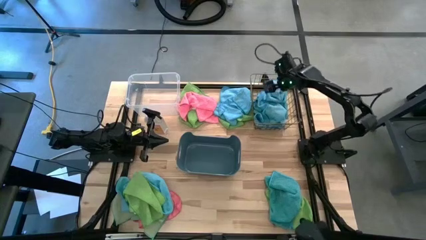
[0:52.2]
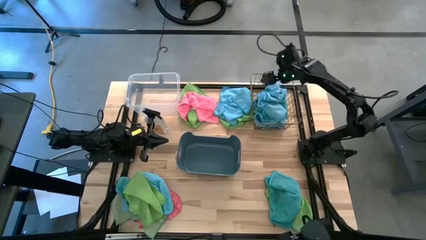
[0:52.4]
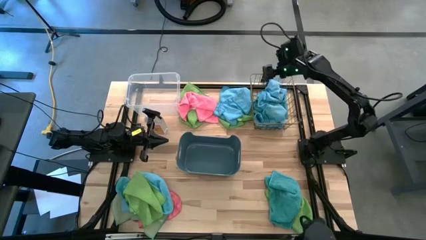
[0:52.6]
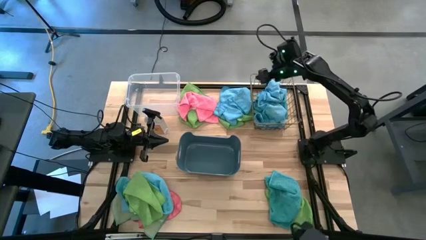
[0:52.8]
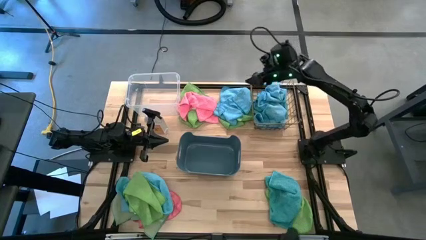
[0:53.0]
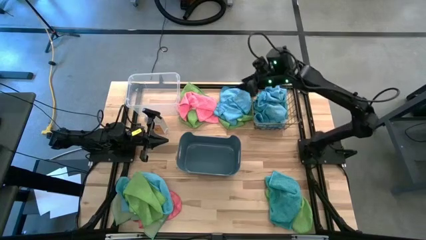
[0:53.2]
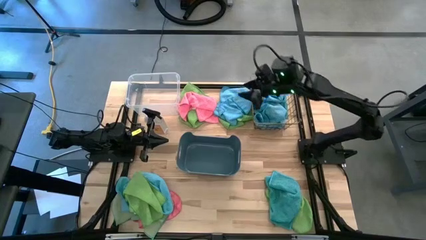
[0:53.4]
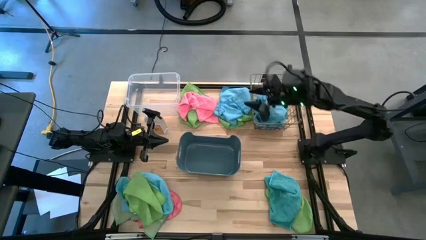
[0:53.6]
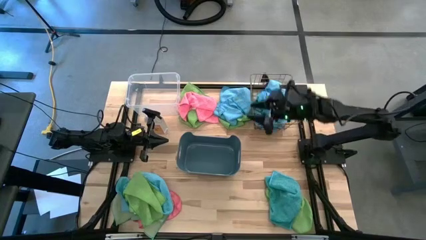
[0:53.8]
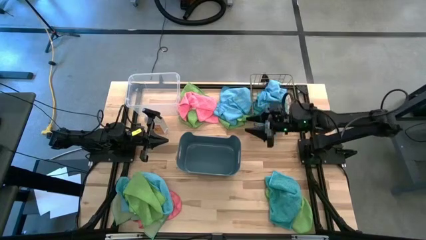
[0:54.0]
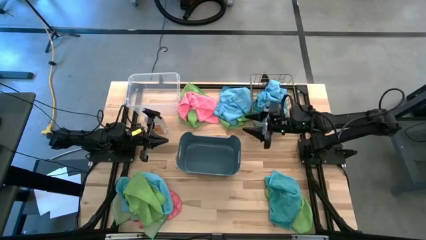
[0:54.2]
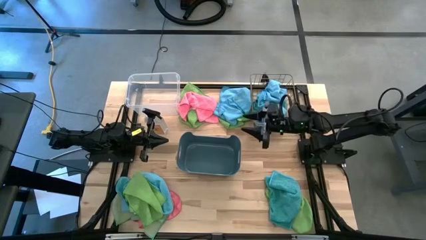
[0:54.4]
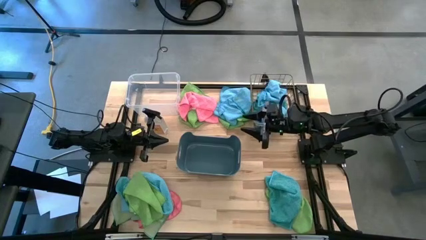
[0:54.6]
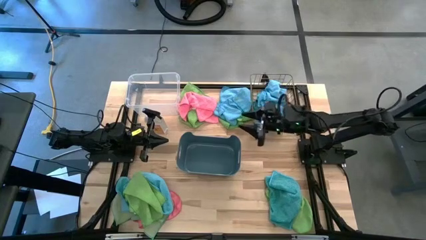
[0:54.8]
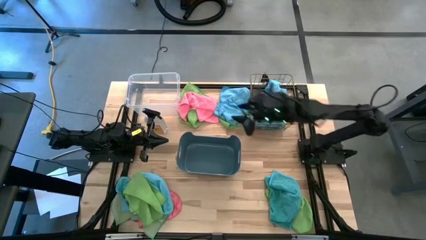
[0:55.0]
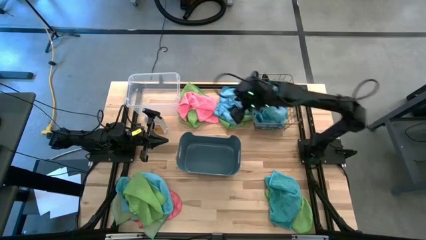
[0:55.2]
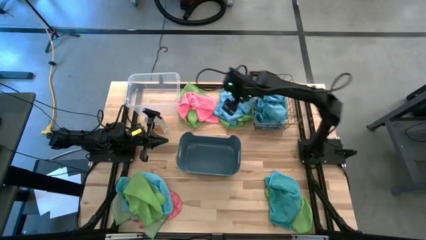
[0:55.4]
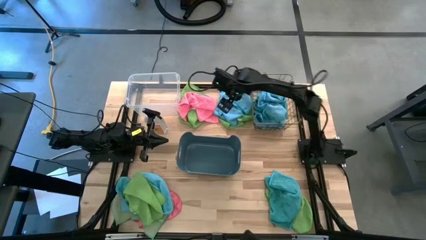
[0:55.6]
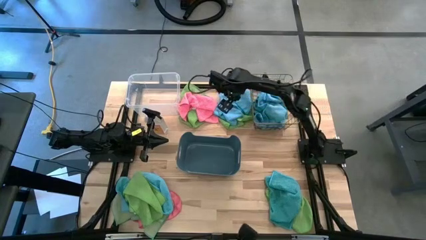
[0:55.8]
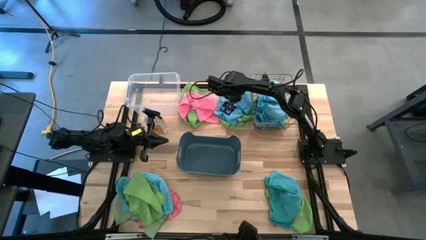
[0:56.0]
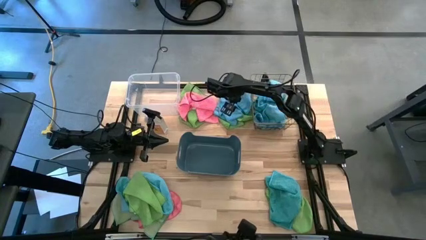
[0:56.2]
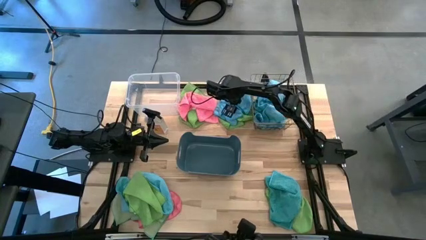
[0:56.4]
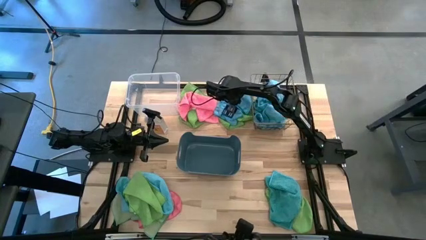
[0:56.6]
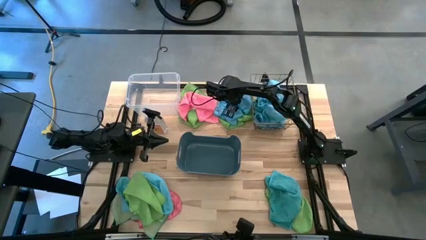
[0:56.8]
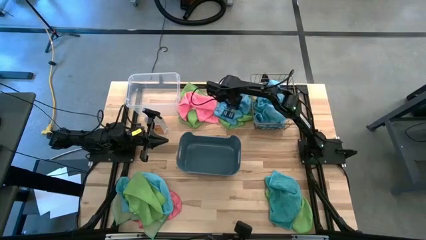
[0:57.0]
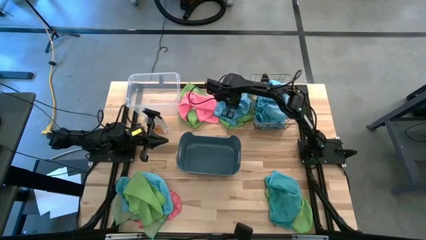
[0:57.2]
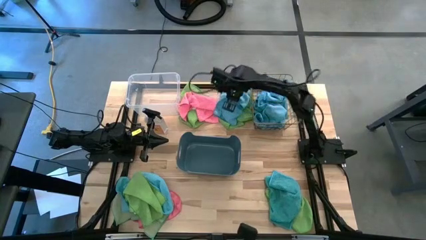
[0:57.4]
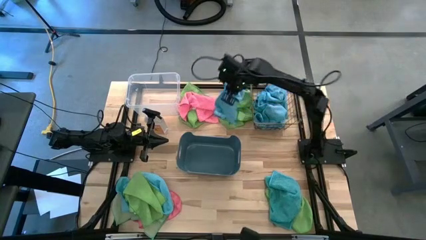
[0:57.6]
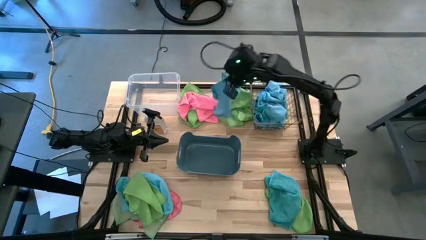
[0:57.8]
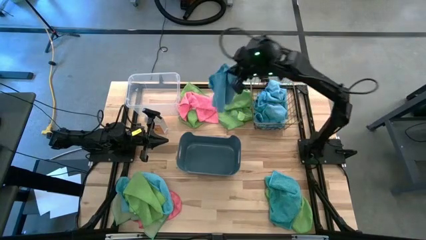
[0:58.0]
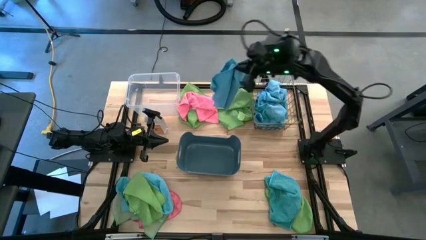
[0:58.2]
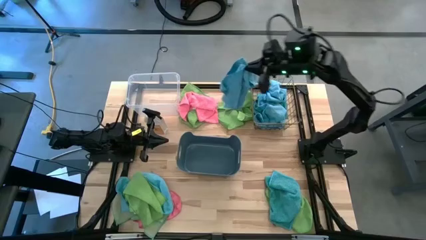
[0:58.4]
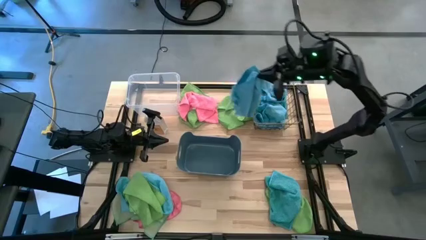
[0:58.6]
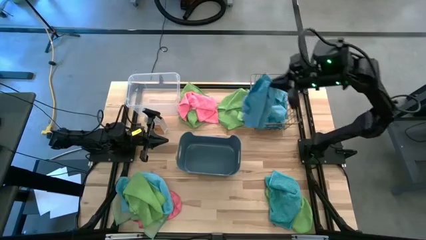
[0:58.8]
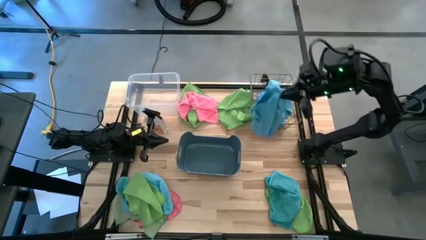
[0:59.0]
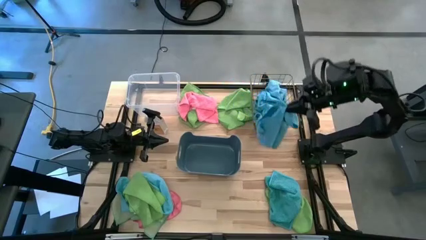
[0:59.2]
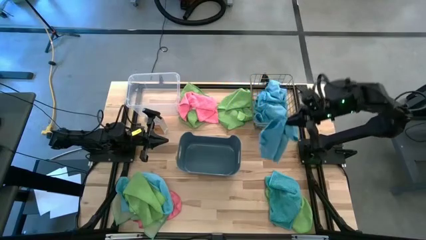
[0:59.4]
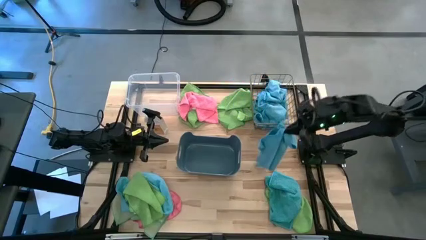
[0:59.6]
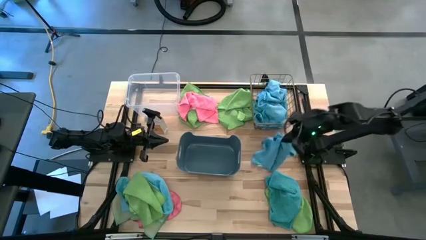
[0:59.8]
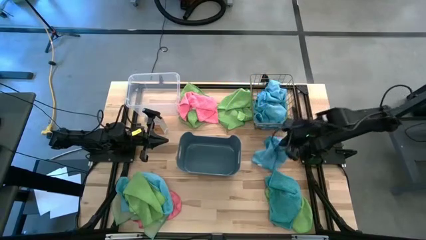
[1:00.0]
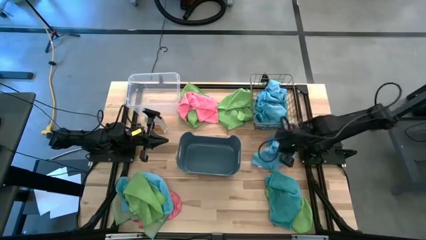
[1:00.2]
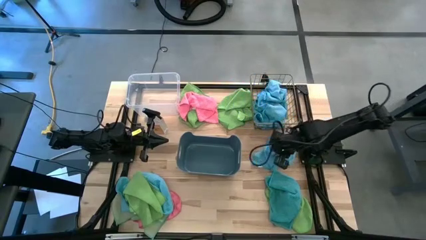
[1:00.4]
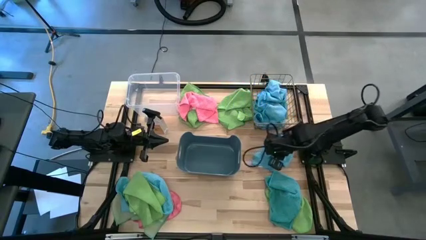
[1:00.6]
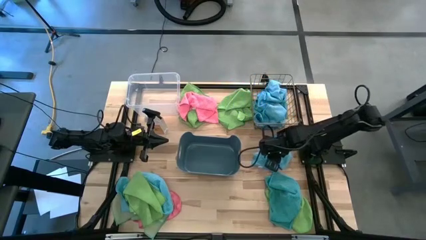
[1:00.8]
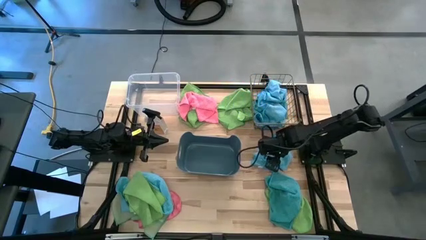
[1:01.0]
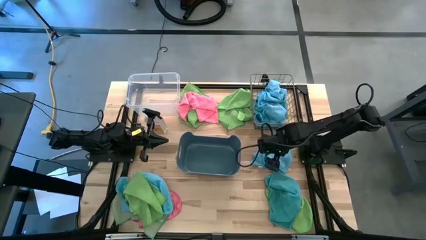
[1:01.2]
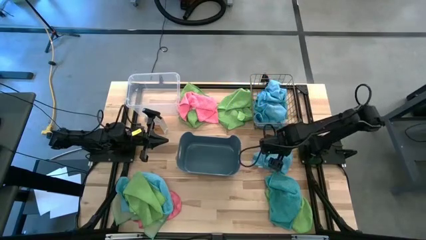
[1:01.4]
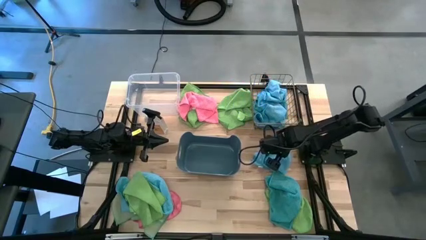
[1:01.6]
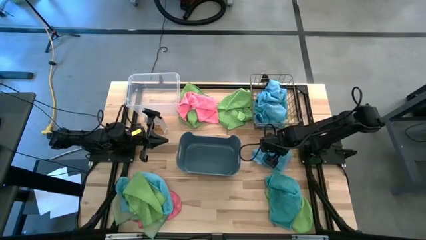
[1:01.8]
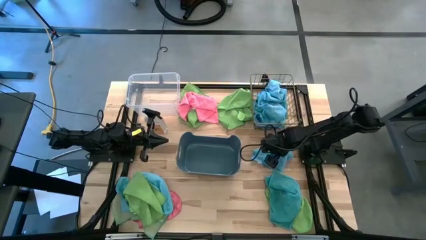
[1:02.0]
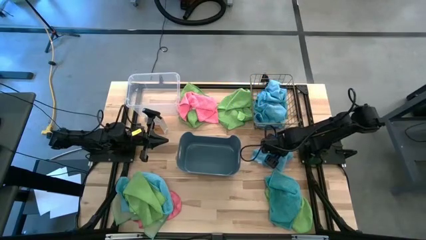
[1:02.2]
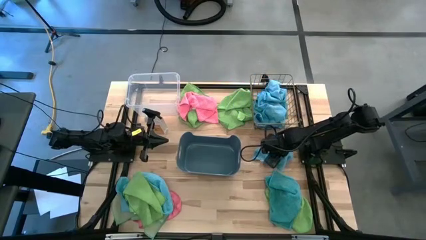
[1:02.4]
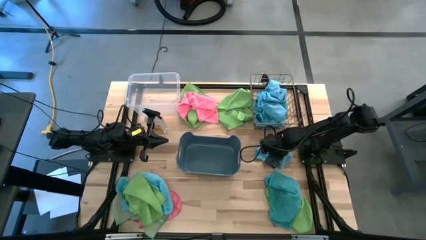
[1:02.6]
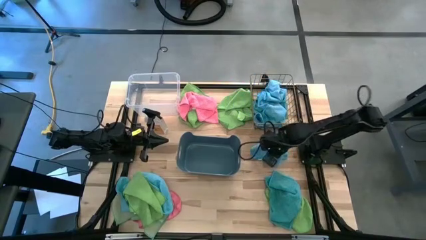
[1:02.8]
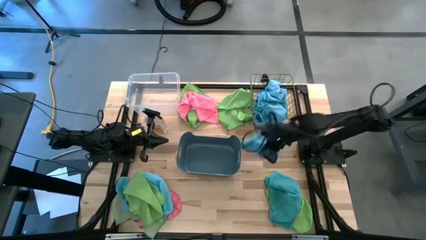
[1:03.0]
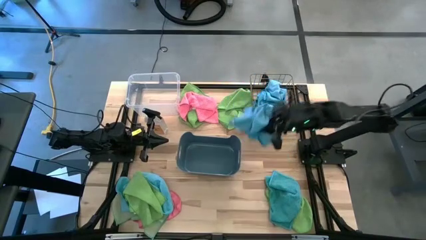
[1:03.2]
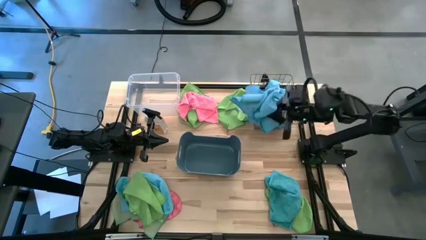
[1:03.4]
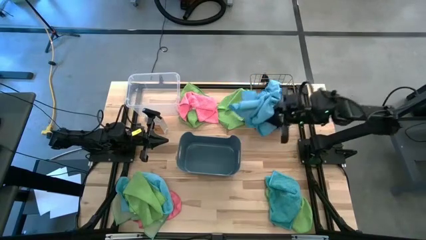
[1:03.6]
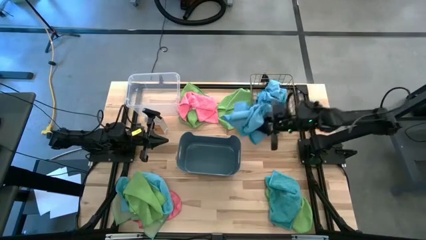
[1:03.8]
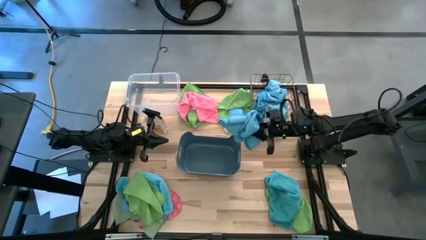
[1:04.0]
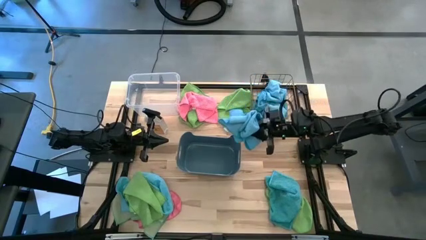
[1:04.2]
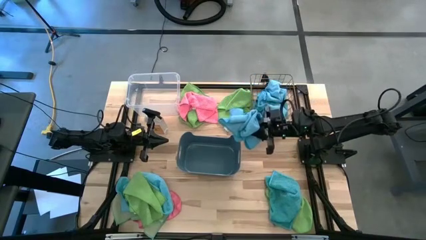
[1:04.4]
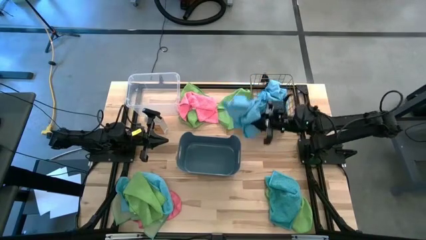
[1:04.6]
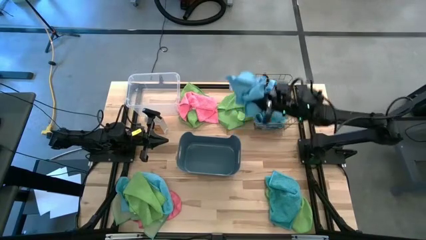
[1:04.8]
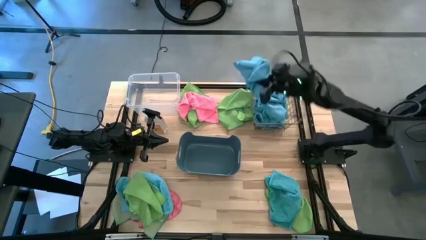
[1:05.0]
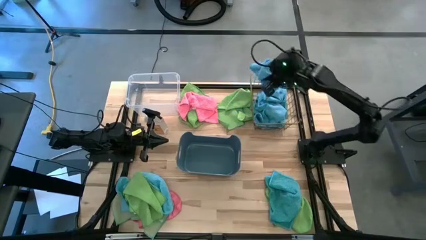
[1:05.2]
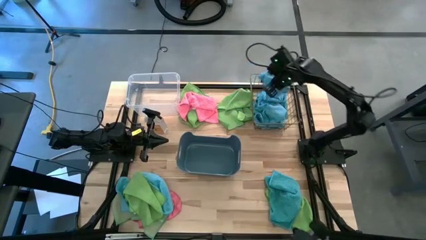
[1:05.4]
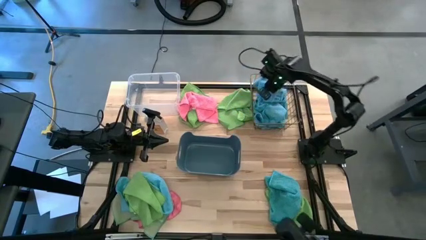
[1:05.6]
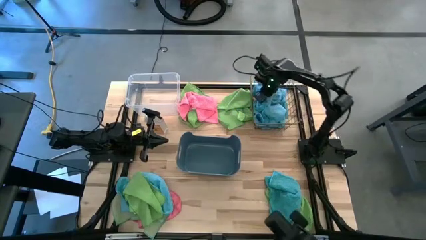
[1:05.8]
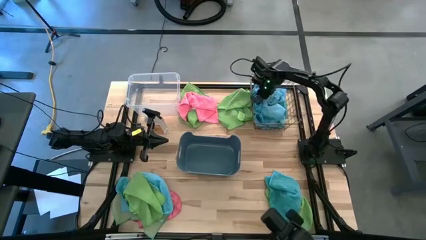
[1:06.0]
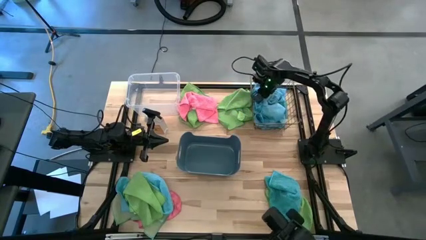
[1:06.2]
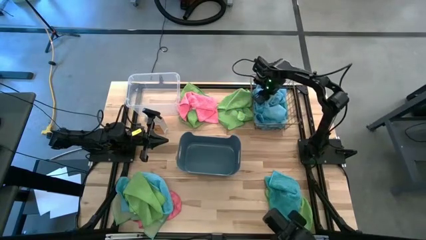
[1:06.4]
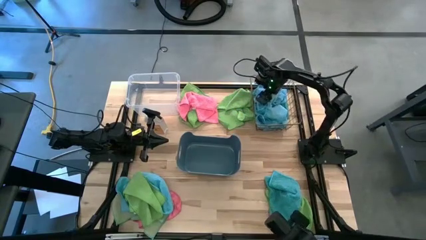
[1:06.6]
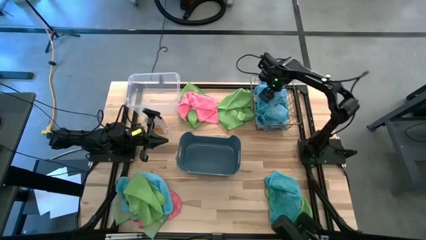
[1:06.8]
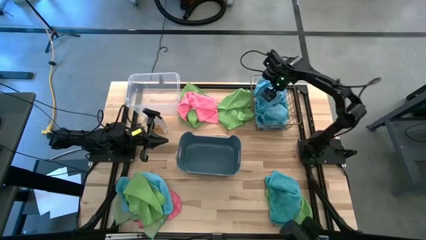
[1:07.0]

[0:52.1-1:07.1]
Task: Sort microfiber towel by color & place in baskets
Put the blue microfiber cloth into the gold wire basket
